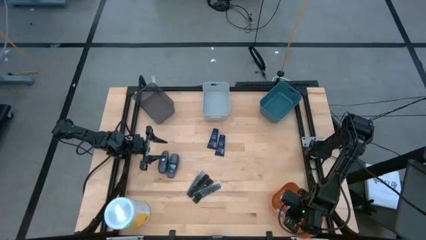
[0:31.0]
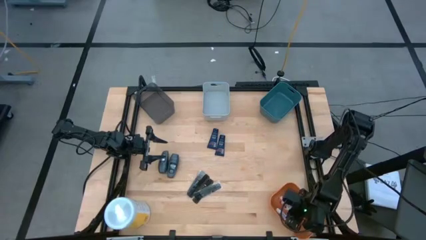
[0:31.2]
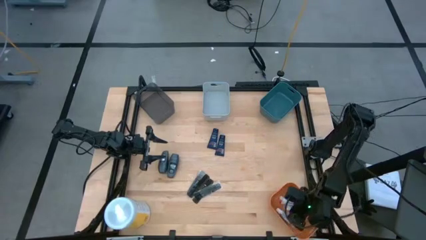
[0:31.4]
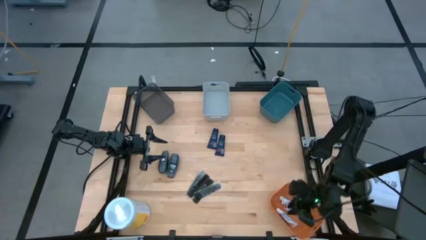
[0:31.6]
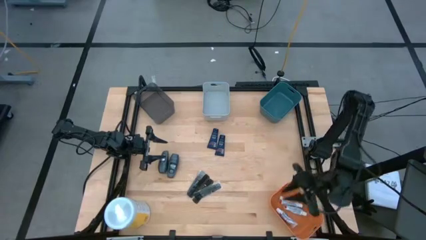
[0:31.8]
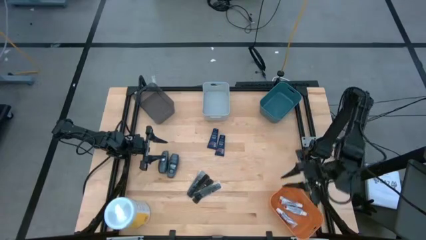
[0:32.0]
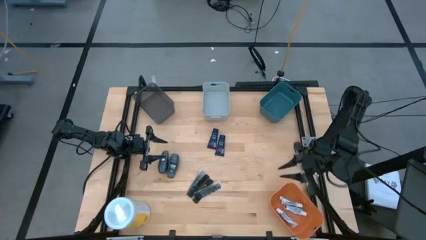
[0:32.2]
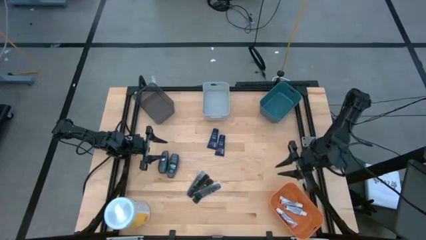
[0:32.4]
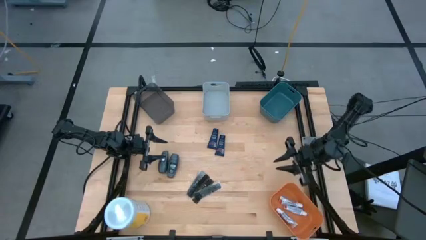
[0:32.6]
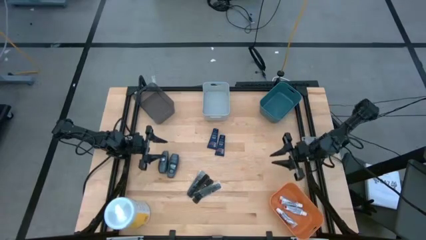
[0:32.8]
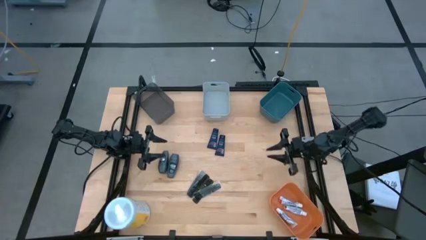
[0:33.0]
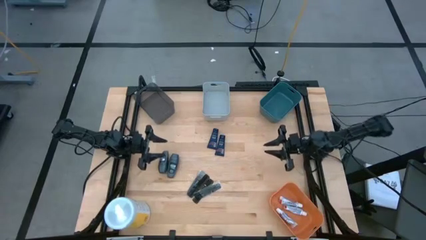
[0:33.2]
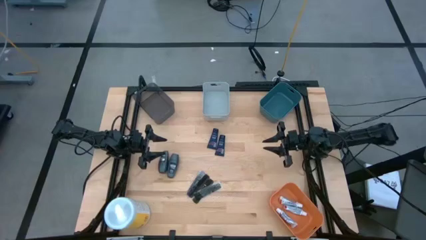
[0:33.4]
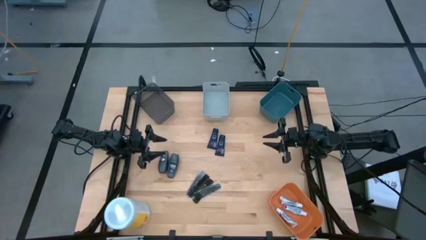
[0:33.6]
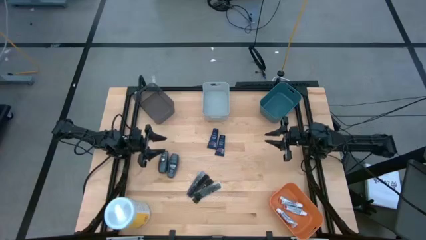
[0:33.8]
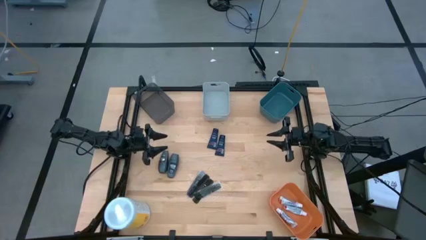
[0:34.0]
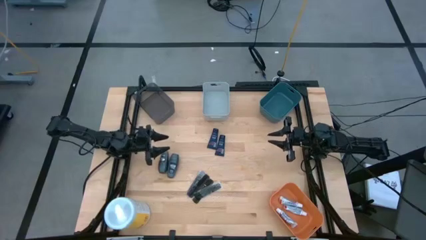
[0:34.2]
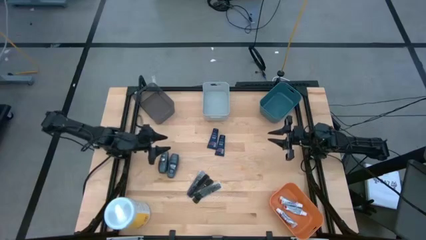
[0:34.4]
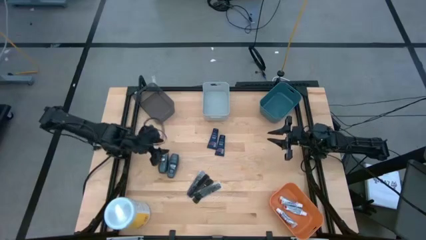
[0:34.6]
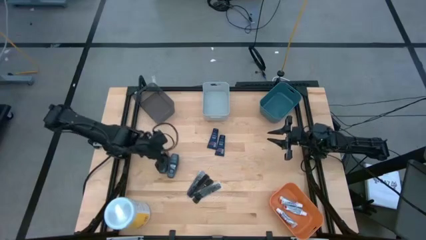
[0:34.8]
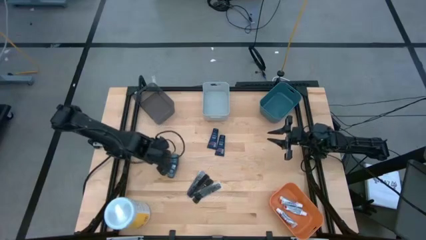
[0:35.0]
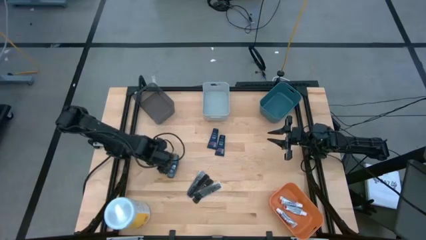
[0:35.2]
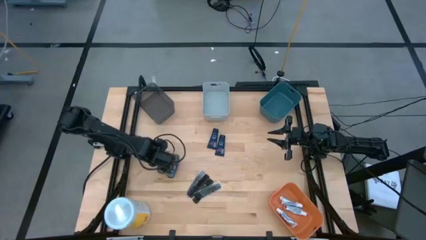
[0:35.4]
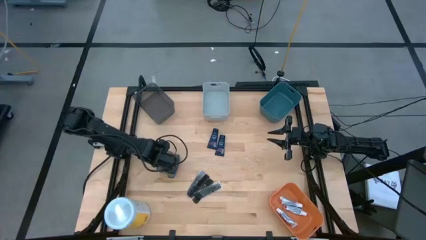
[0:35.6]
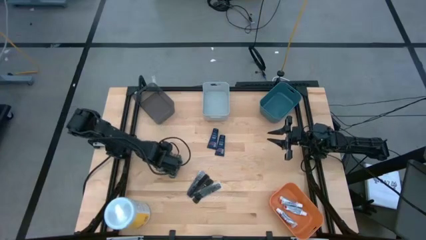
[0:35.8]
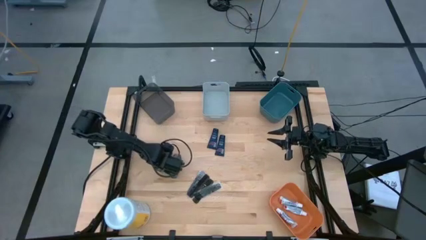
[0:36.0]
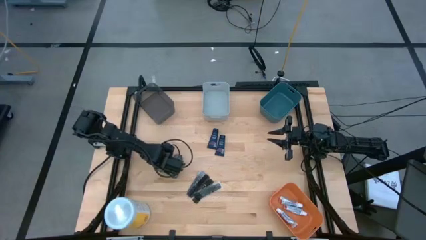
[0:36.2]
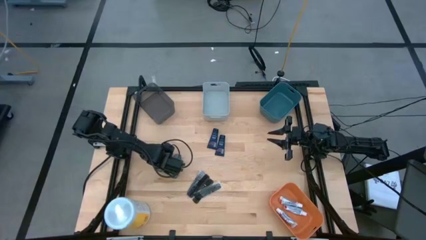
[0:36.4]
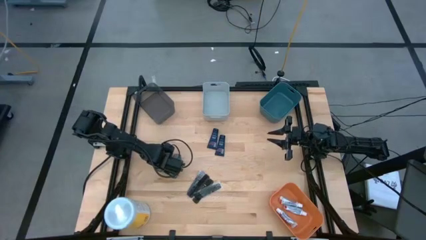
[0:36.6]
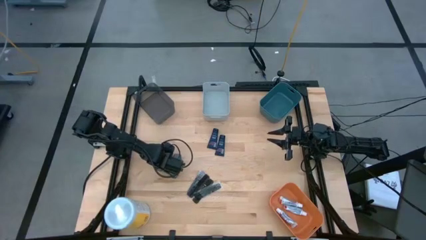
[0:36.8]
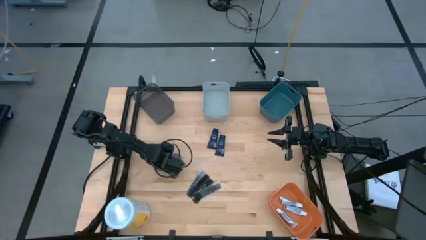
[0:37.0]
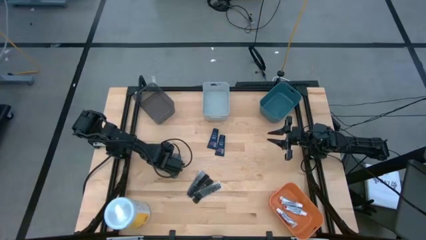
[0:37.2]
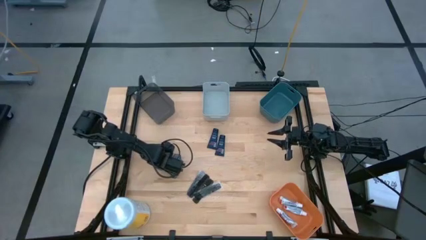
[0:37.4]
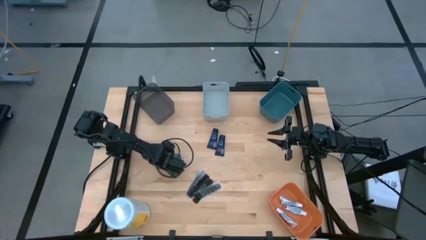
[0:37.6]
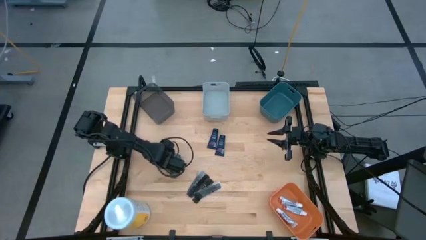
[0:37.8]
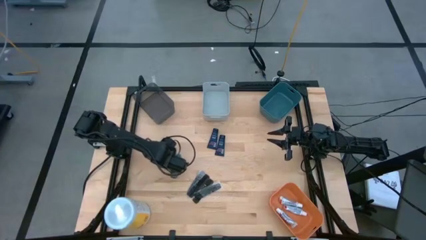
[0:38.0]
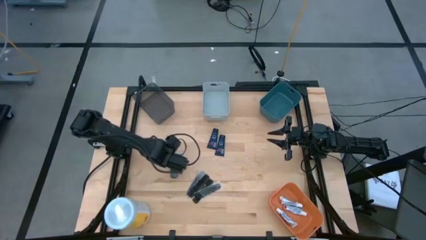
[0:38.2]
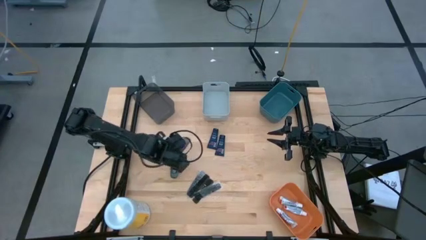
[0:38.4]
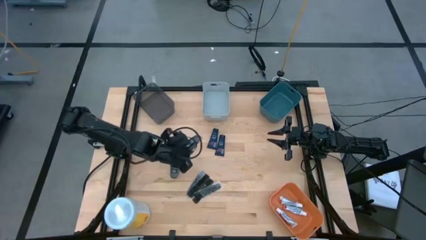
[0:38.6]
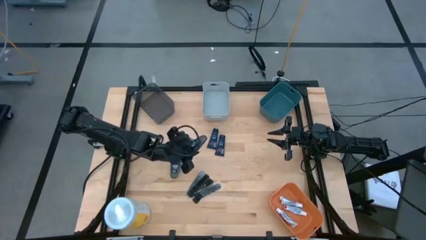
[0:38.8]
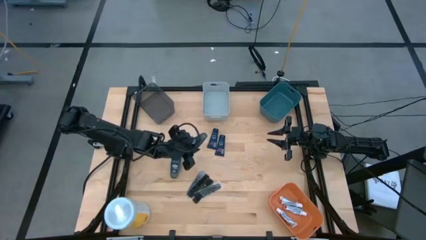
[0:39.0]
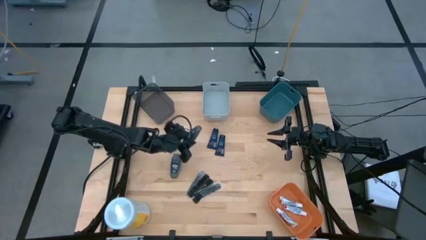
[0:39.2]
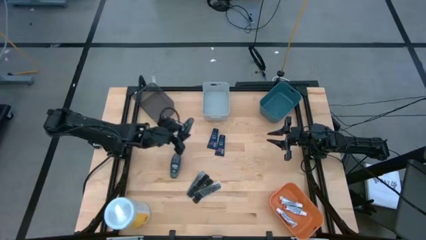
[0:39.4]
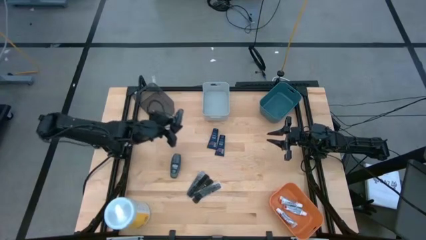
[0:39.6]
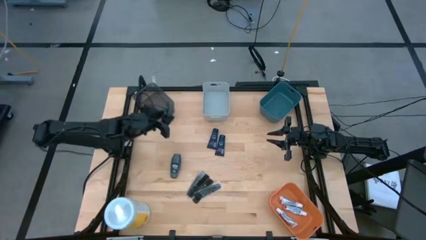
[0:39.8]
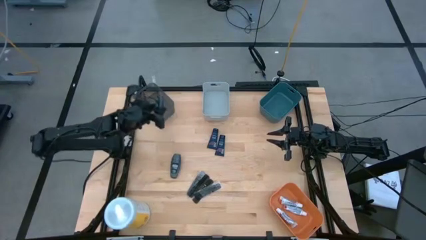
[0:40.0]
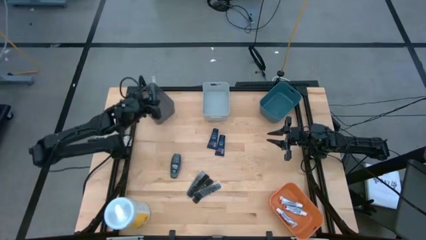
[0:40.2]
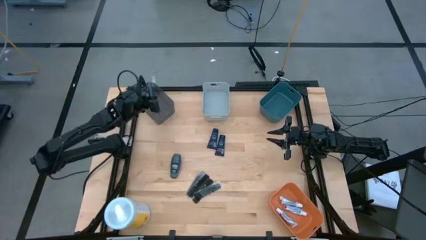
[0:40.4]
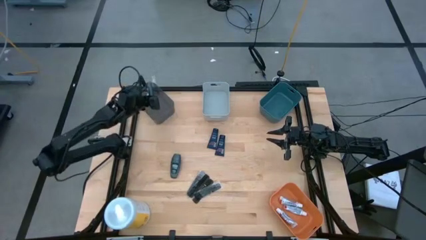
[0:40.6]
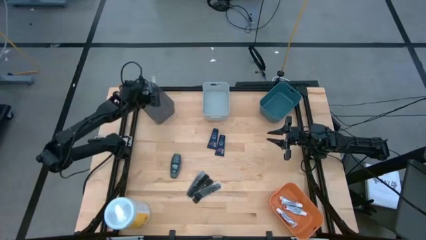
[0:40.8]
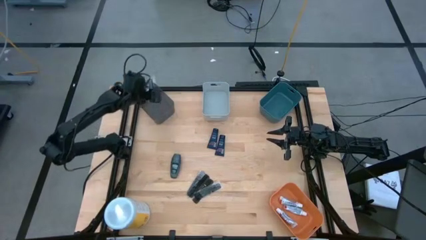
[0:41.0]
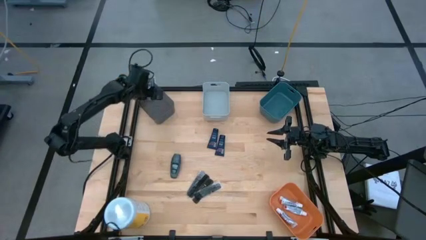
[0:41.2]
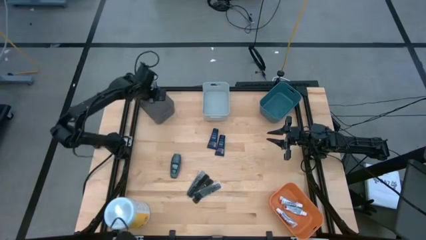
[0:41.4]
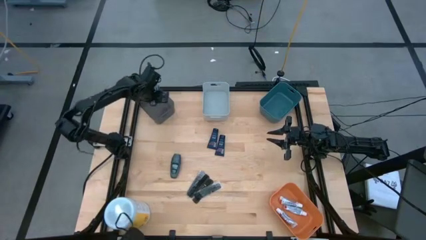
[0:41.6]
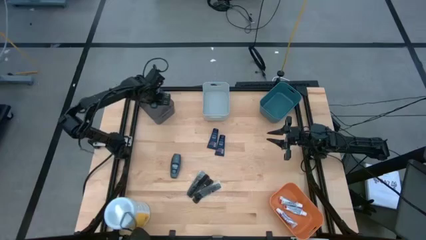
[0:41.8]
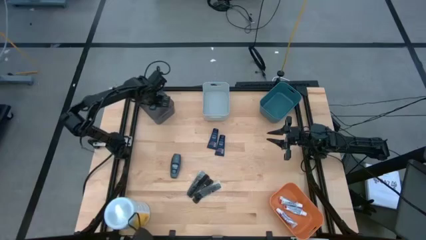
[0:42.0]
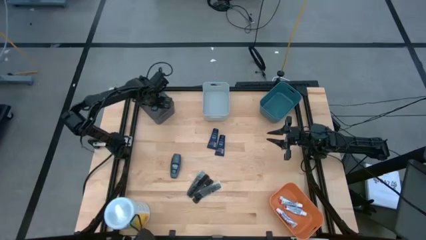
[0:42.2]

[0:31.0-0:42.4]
Task: Pick & Place Travel size toiletries
Put the left gray deodorant into the black bin

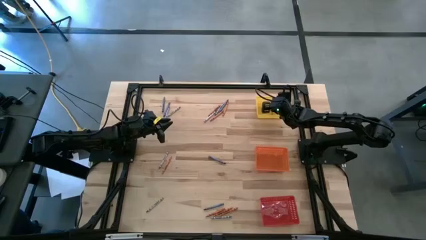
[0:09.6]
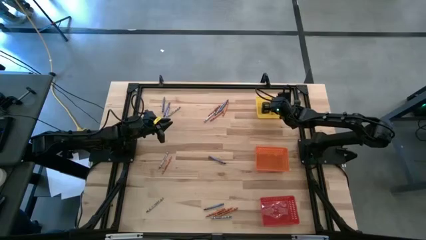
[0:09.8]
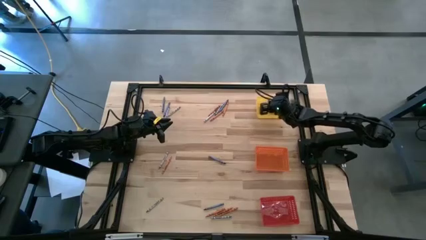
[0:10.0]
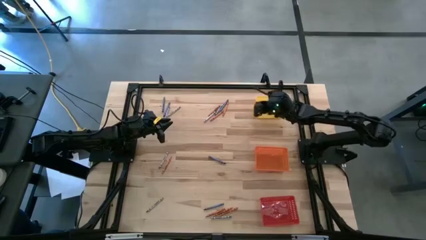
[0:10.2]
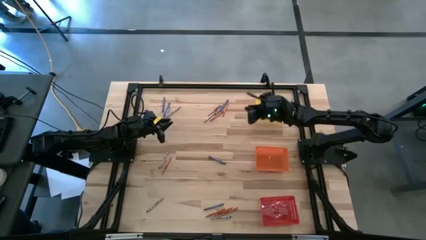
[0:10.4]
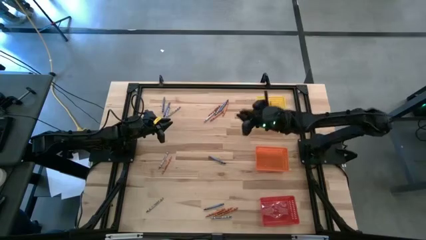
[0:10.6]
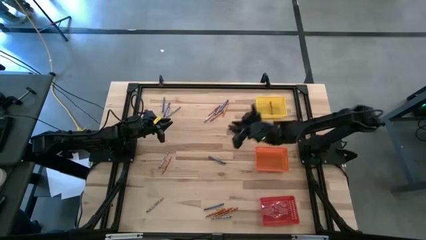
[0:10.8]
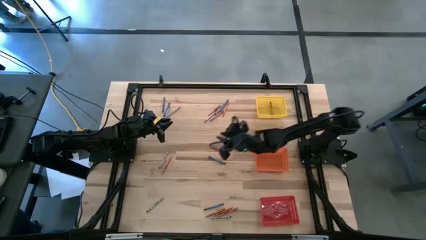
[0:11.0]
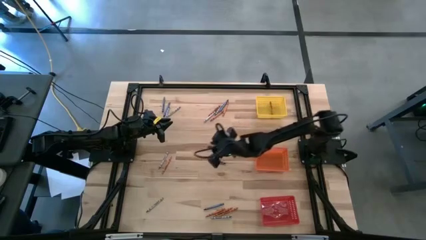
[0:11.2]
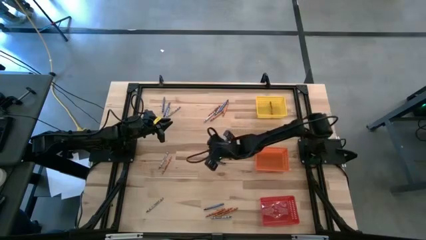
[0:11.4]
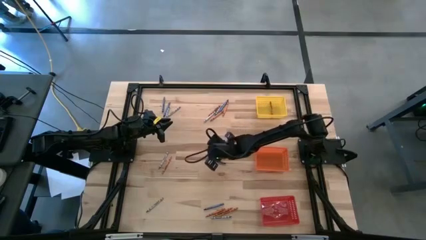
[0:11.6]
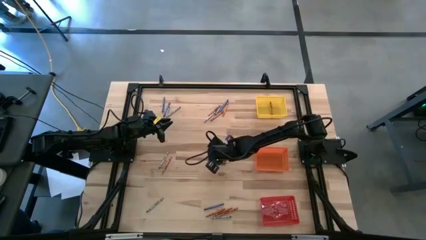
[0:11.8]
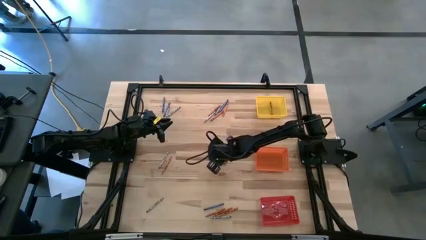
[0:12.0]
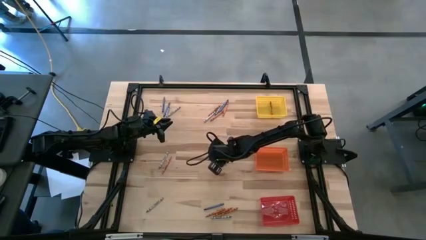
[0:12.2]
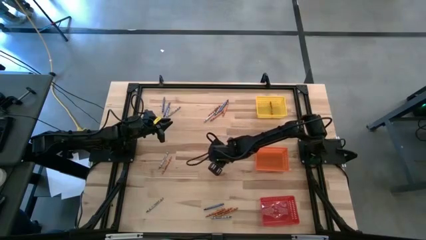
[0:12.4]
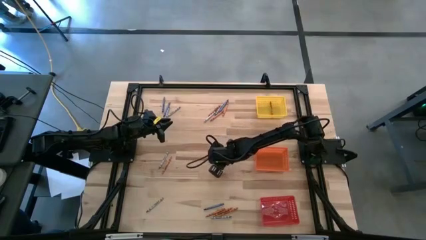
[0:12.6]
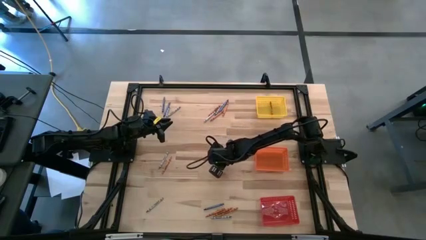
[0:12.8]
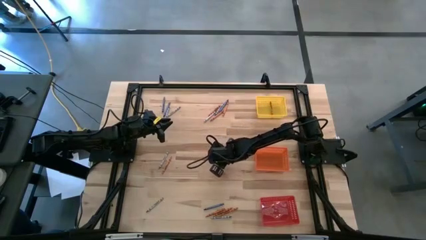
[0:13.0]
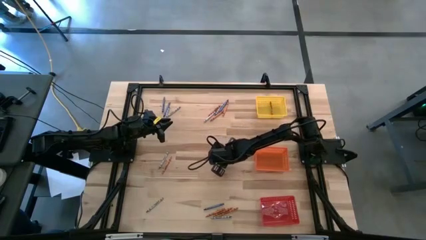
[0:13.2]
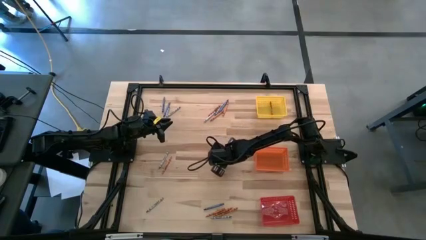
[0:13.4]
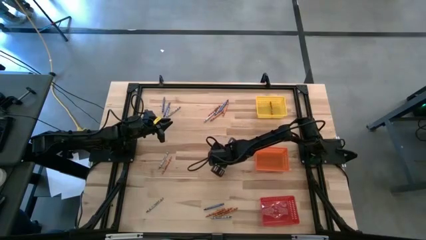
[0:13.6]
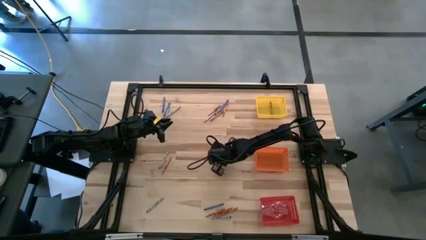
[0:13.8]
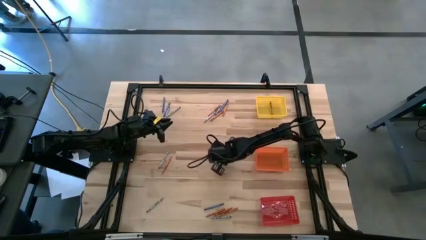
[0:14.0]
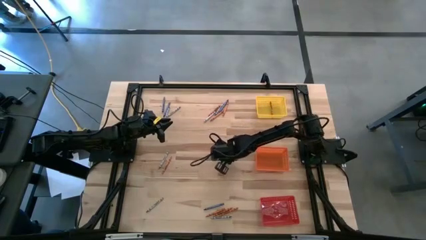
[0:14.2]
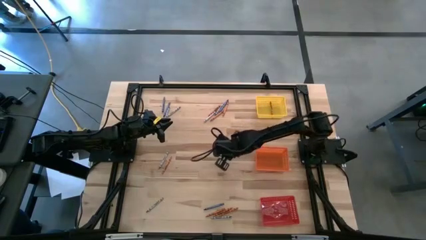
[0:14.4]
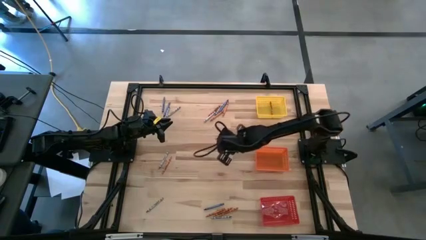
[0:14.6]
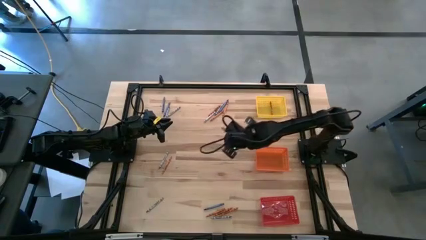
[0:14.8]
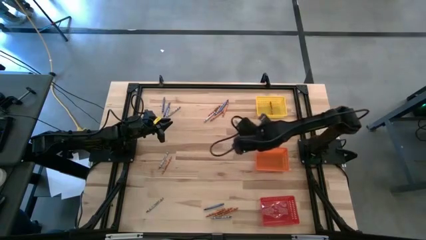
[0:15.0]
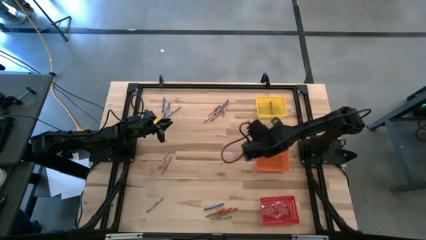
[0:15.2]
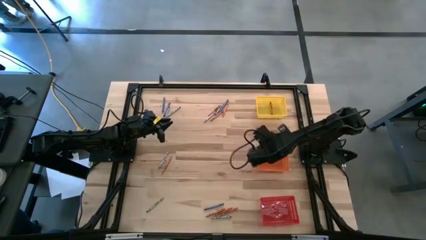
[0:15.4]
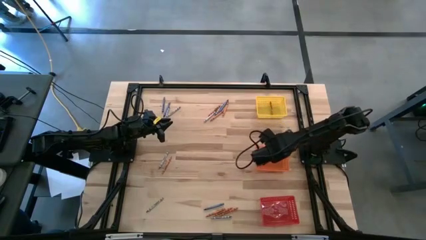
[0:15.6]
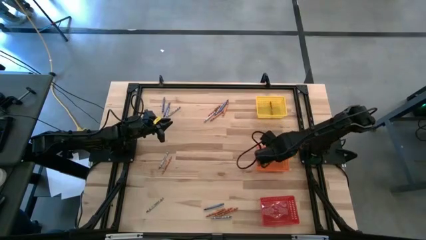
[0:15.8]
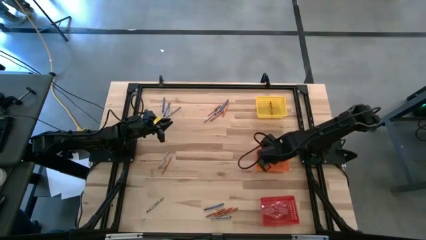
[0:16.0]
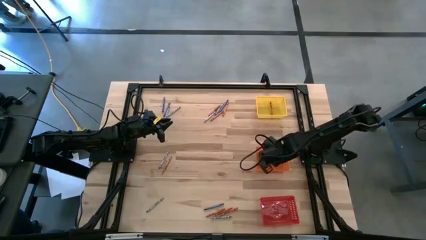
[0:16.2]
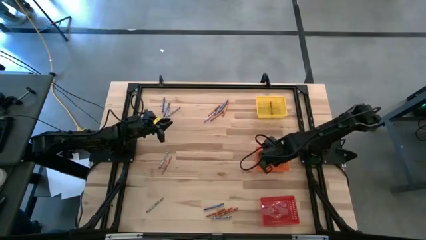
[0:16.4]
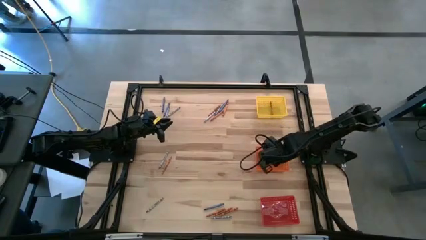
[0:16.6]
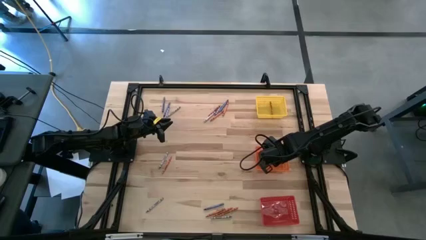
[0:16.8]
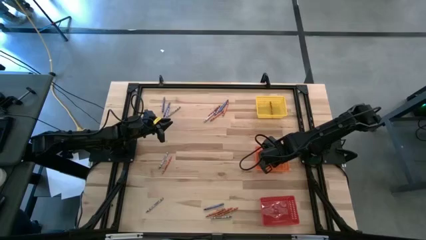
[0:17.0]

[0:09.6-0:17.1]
Task: Sort crayons
Put the blue crayon into the orange bin
